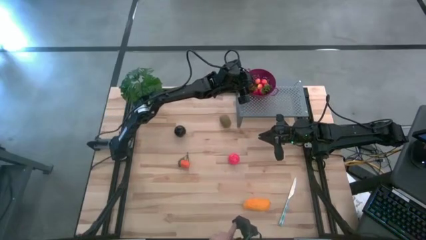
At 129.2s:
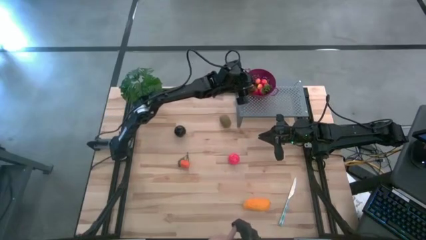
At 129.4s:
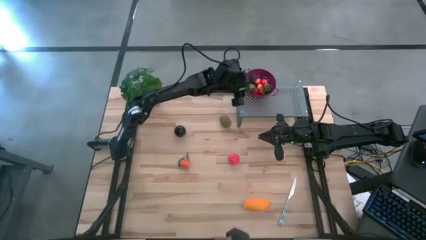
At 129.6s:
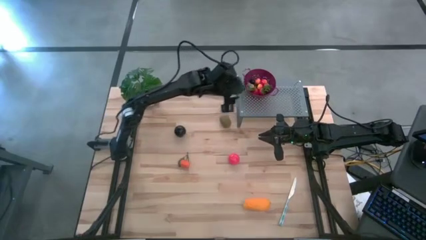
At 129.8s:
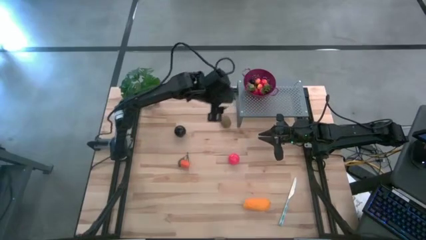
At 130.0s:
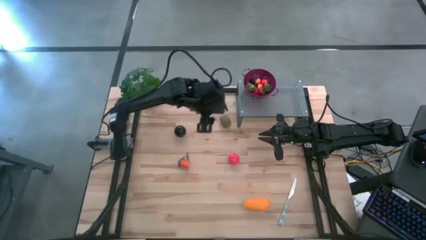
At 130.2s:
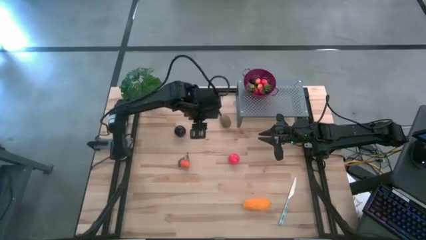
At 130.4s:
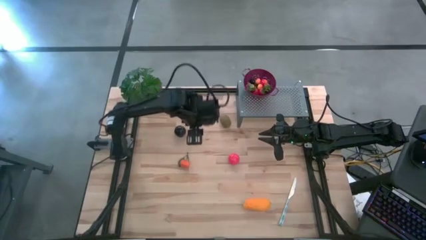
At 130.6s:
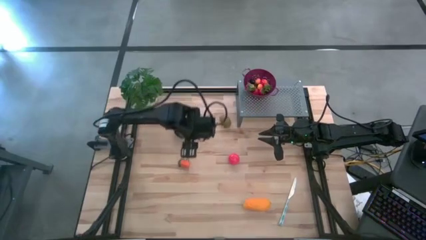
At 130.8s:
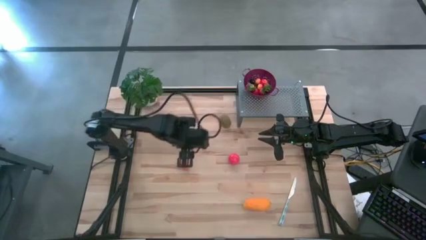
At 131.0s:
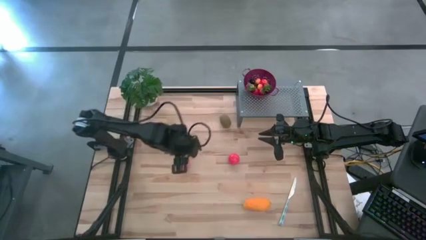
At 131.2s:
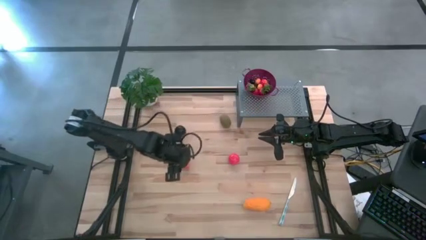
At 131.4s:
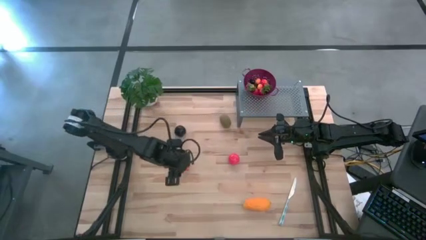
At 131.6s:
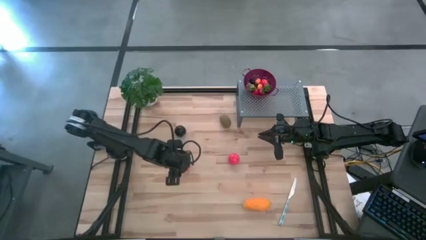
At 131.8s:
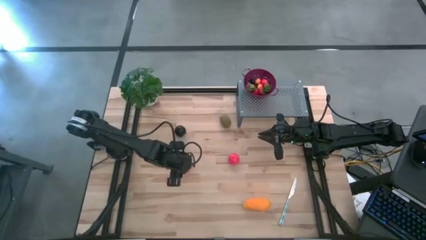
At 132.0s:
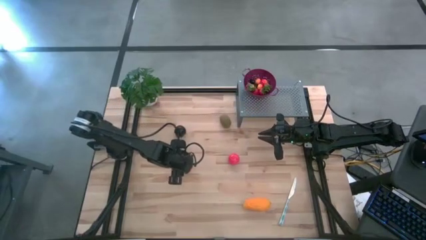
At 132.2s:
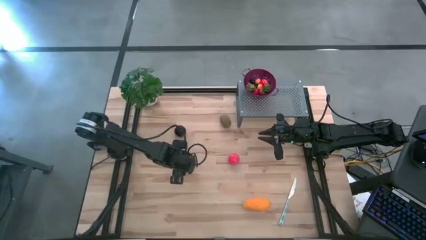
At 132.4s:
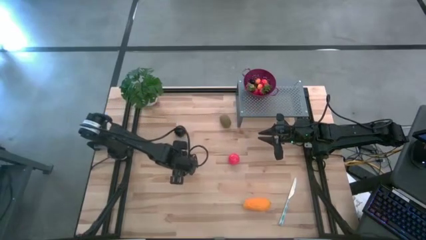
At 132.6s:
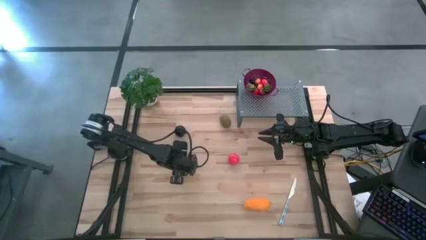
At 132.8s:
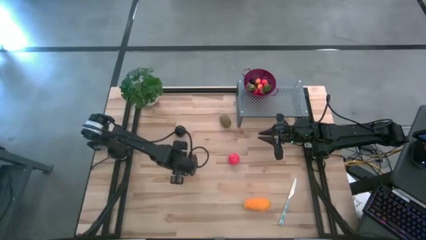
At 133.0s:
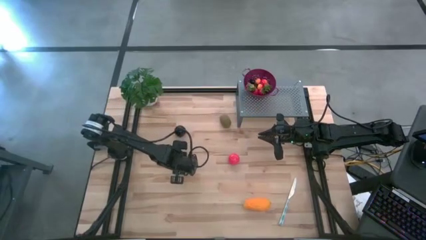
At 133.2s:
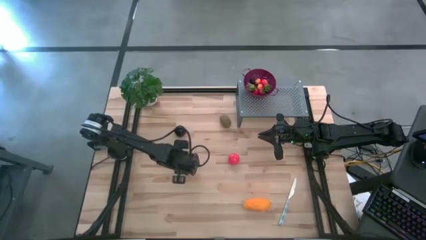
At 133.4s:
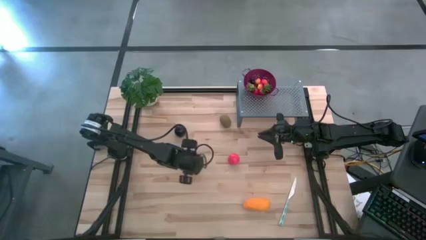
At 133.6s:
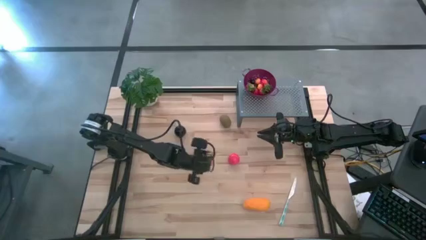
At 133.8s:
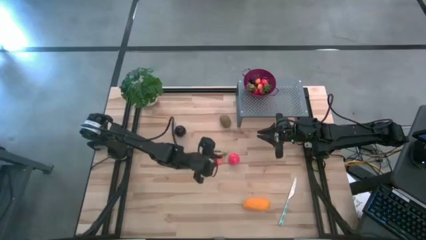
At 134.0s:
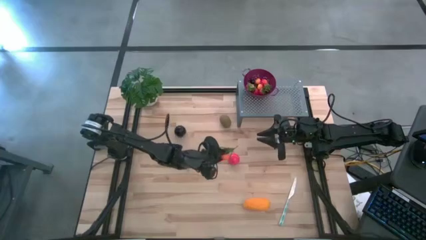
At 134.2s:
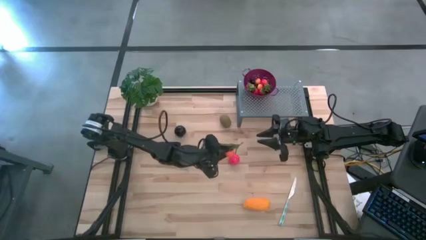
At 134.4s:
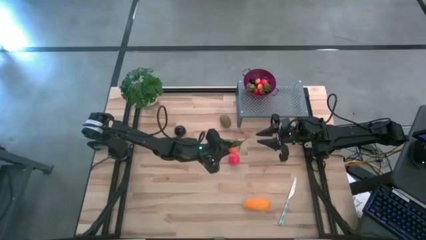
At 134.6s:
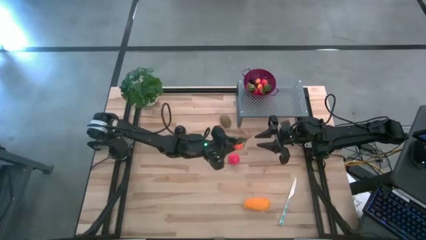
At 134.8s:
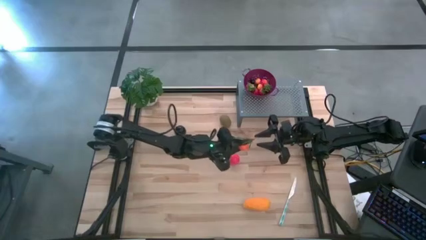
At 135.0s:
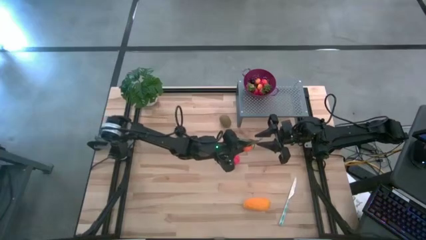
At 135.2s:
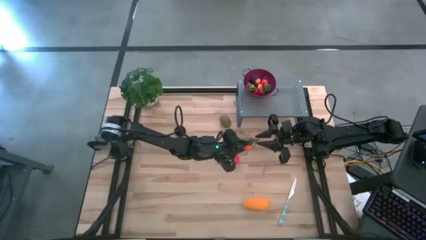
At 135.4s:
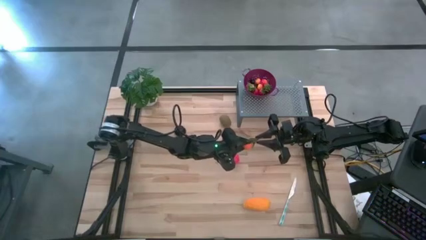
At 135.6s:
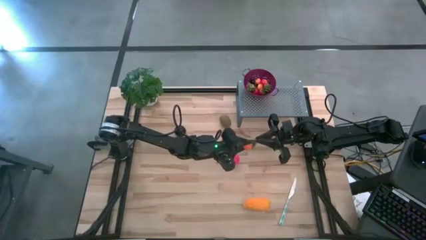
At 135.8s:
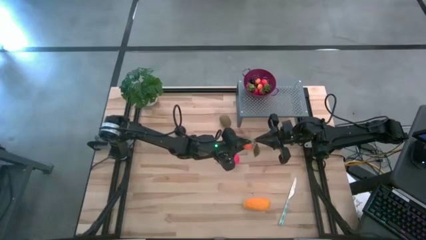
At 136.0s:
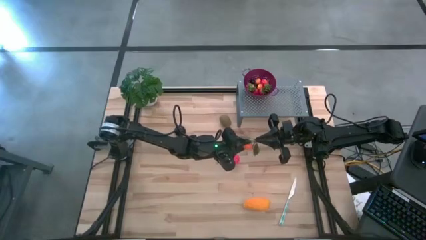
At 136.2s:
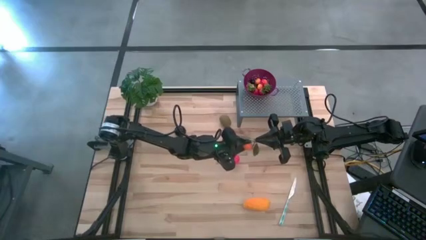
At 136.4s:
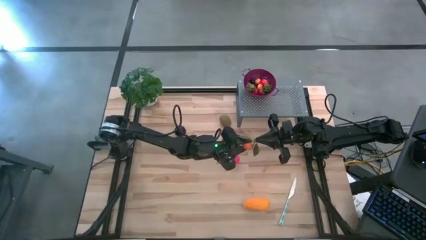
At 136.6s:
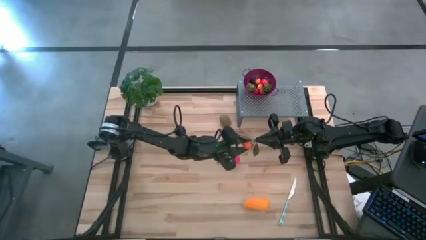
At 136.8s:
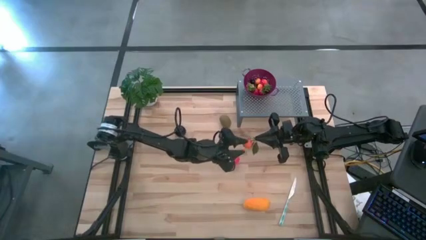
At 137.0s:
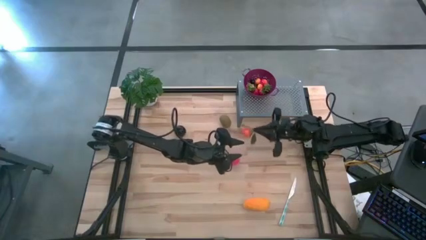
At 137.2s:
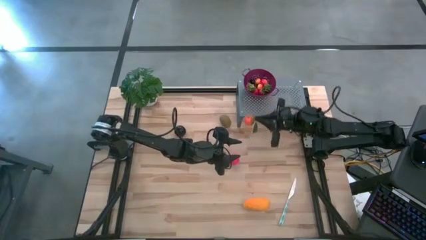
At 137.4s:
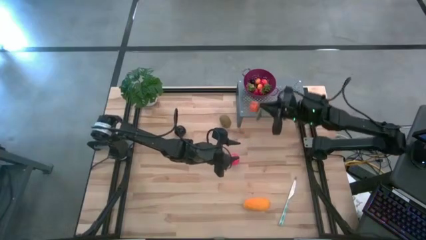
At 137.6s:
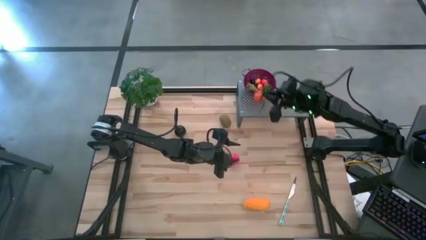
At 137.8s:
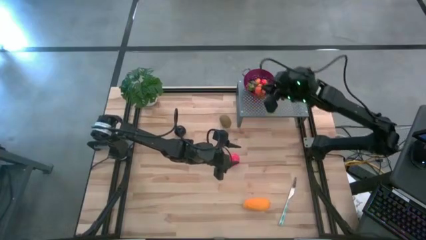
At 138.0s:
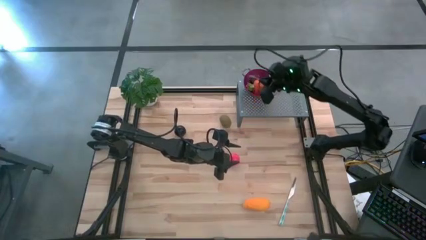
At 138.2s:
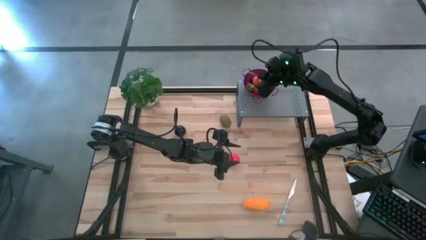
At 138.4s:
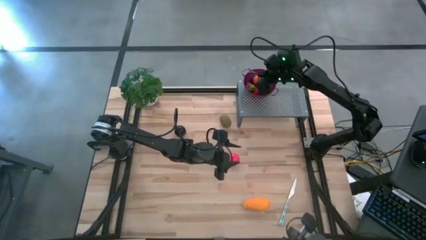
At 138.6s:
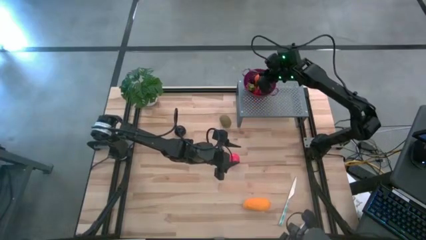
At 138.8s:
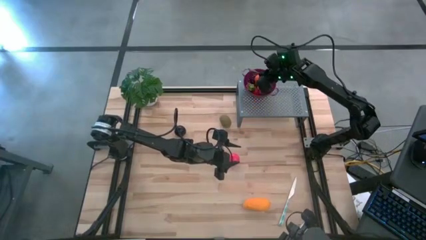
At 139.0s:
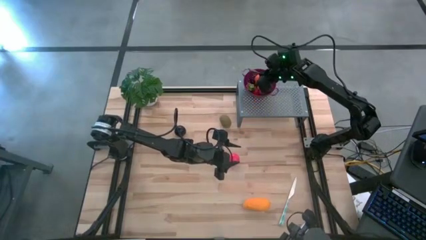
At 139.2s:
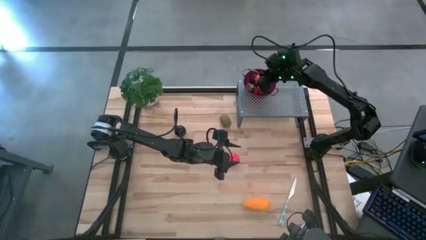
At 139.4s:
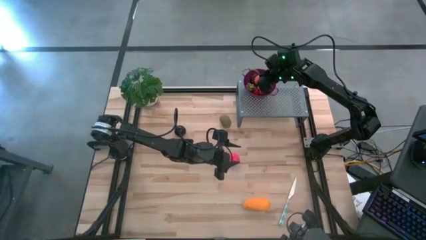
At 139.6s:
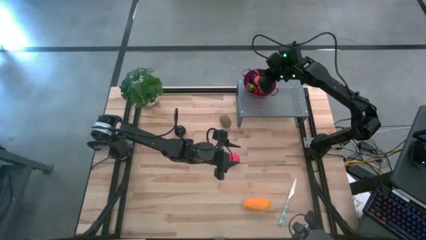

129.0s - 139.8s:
Task: Pick & Place Fruit
Put the tangerine into the violet strainer bowl on the shelf

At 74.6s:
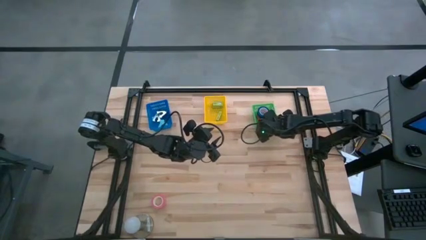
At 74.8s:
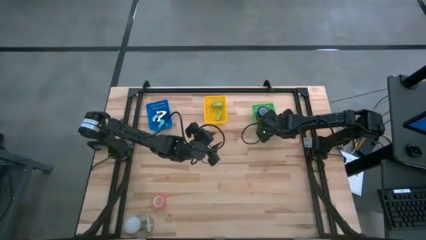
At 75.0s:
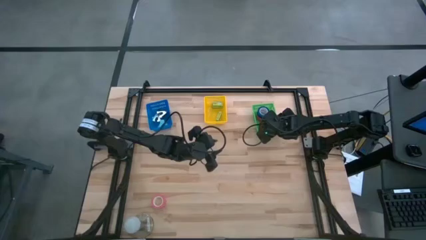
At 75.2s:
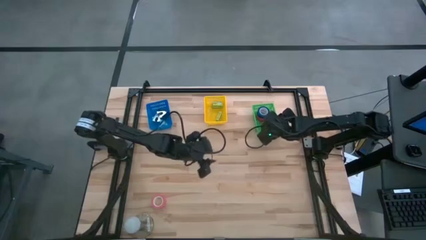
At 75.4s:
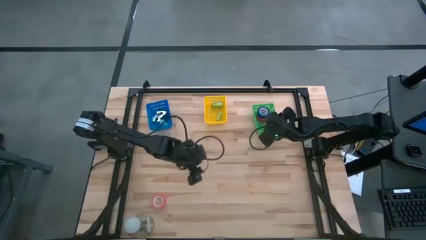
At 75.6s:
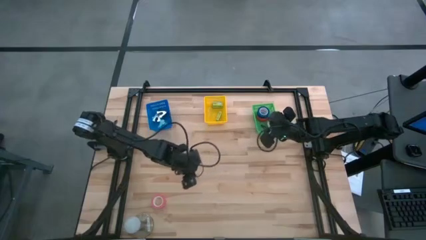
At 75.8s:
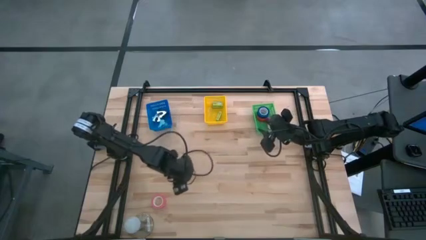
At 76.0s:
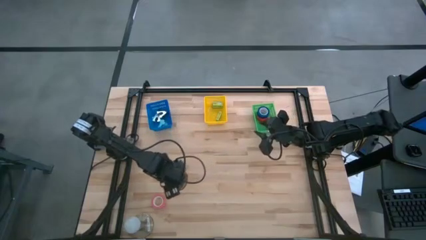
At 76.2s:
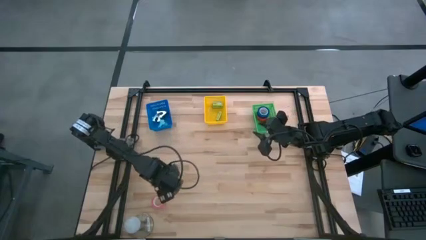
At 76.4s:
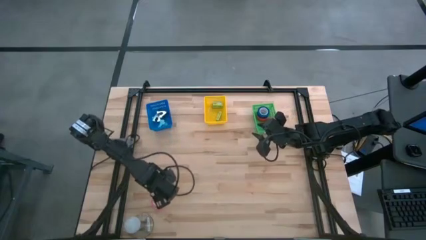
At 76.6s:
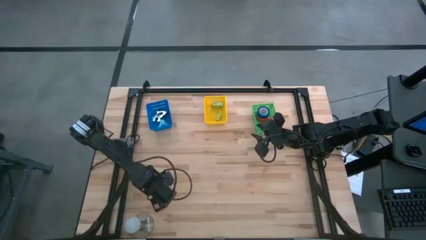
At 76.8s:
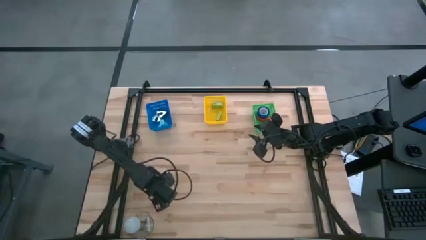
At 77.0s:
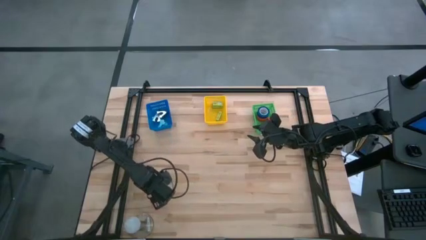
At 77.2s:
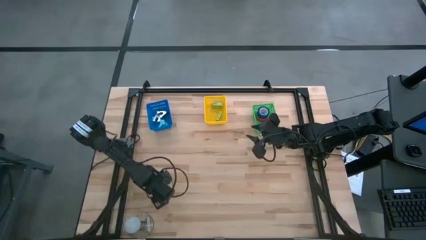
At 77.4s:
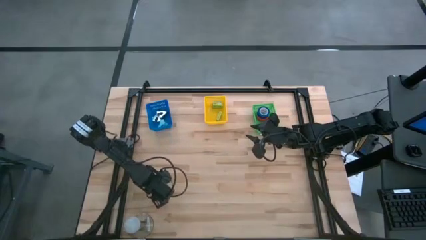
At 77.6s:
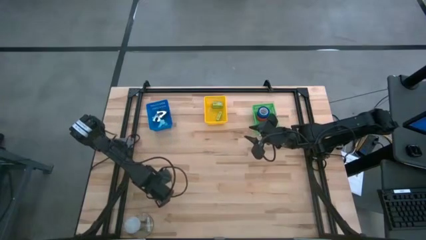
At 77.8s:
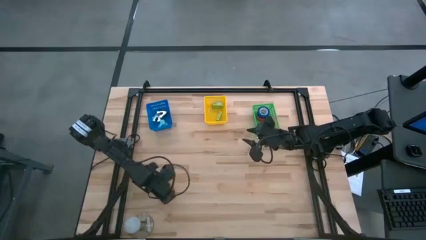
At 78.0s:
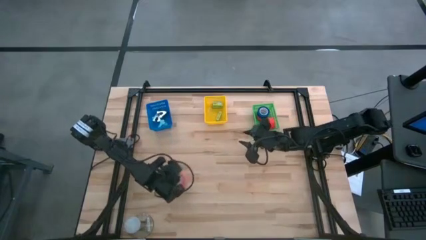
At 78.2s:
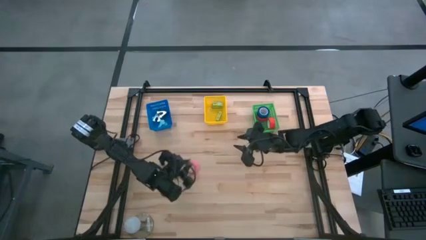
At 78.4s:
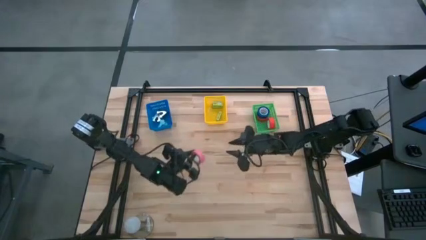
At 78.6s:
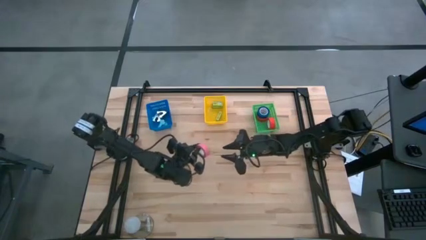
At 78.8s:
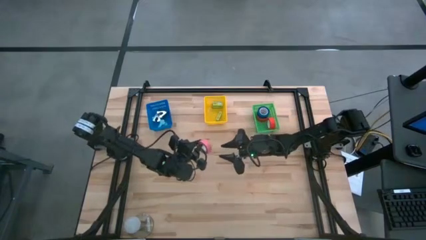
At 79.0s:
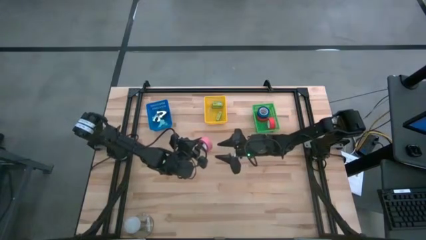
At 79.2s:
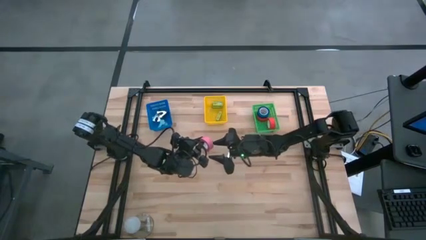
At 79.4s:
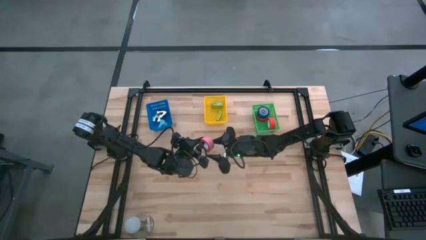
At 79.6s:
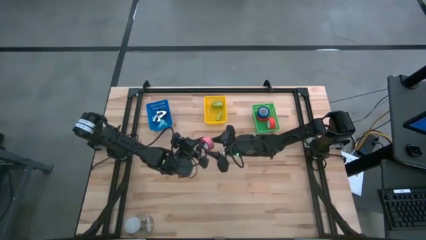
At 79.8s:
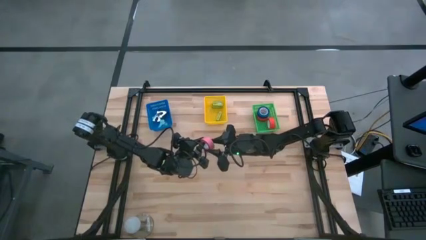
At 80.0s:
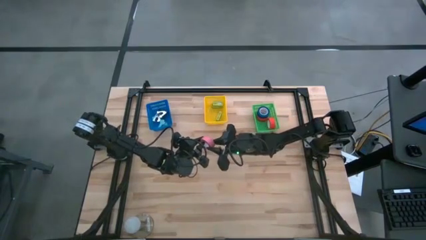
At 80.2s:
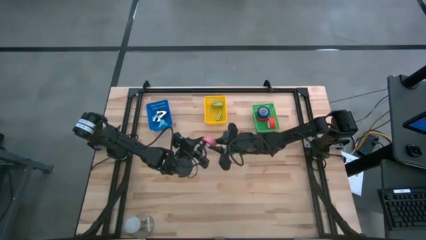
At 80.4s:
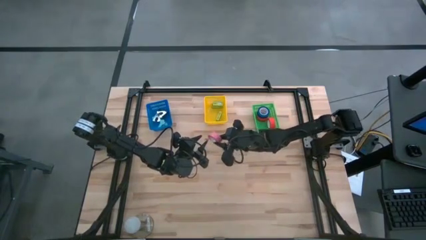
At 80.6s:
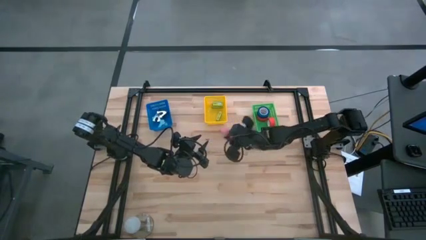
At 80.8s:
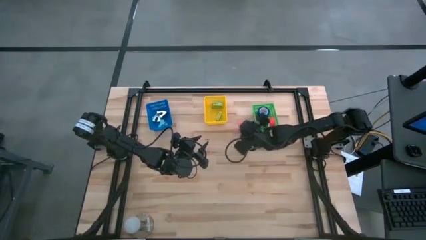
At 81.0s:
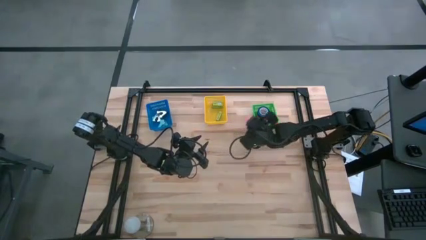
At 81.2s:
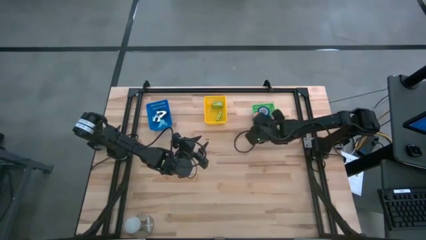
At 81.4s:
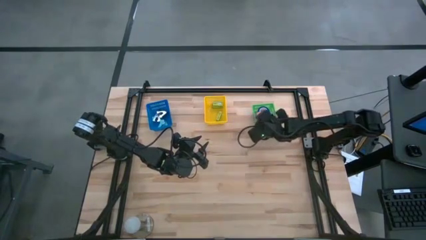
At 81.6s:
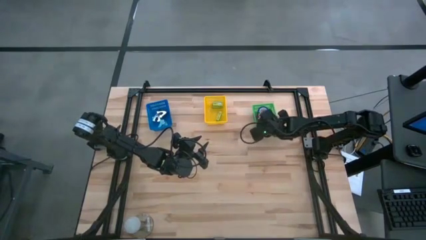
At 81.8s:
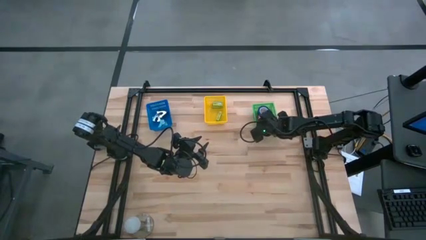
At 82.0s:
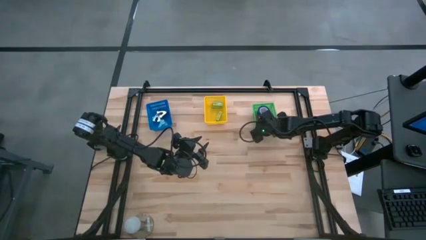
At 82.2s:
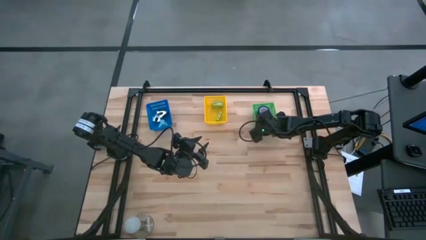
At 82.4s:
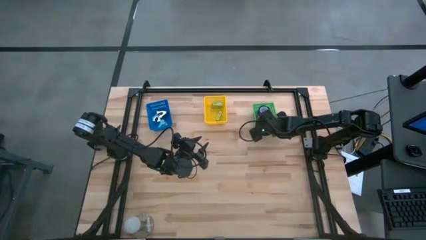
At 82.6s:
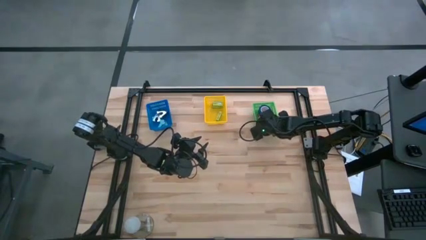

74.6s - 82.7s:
Task: Pick and place Stapler, Stapler remover, tape
Put the pink tape into the green bin
